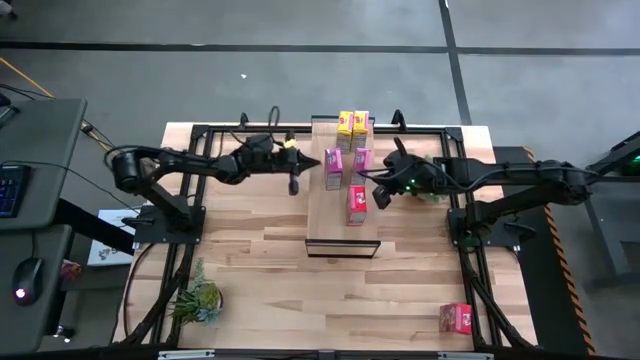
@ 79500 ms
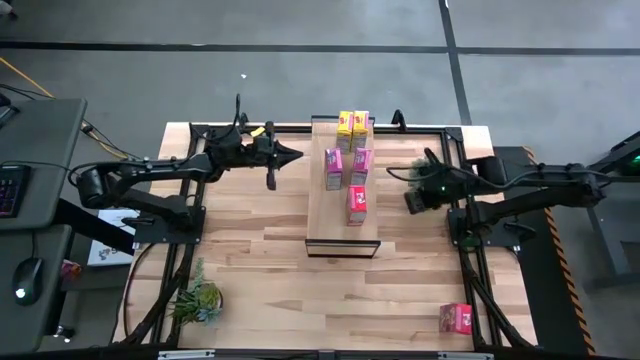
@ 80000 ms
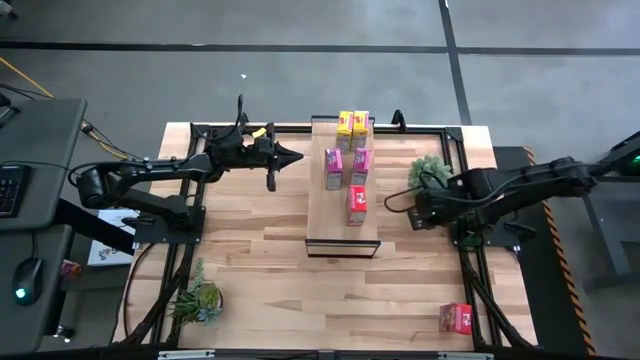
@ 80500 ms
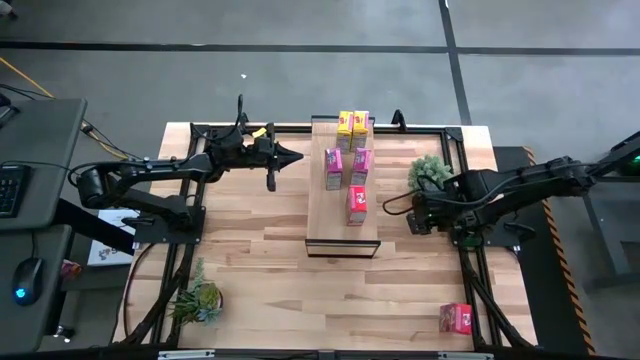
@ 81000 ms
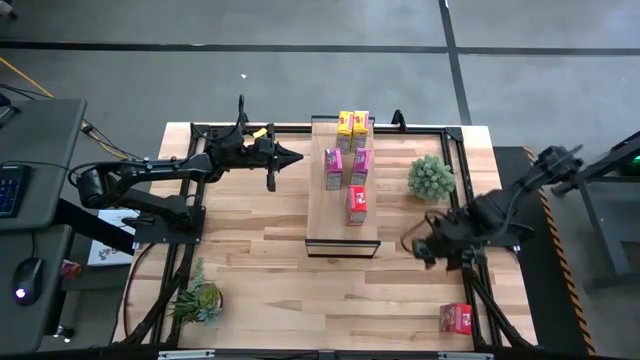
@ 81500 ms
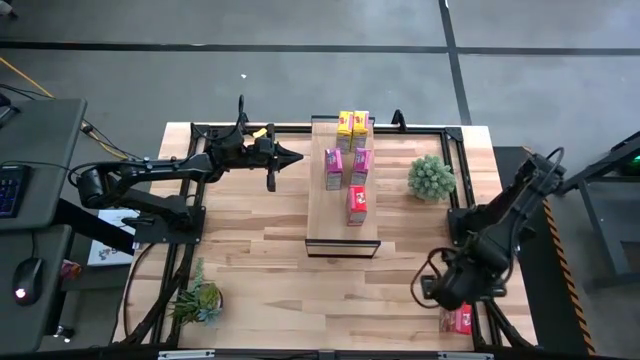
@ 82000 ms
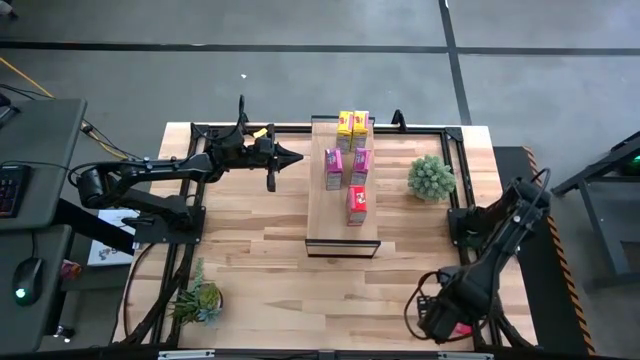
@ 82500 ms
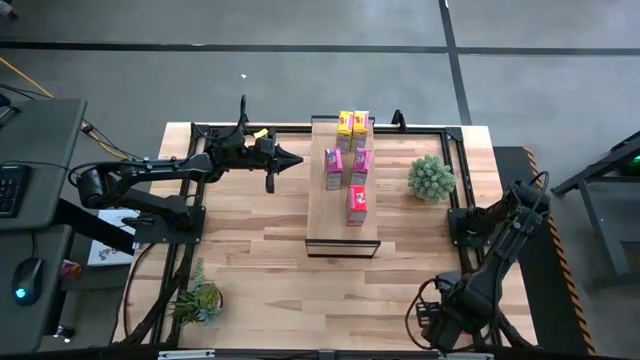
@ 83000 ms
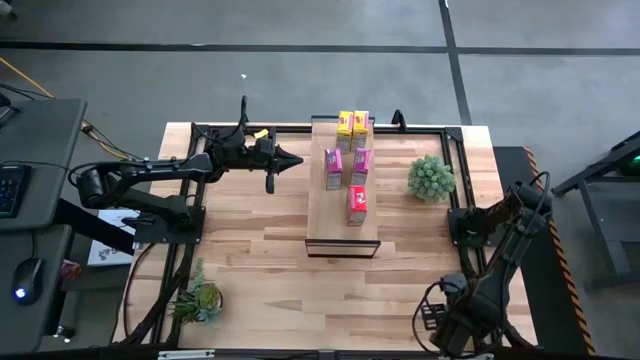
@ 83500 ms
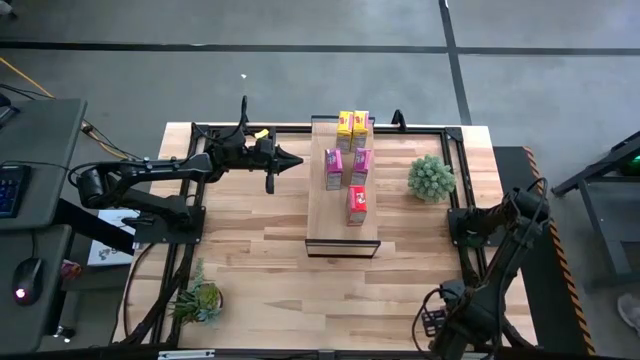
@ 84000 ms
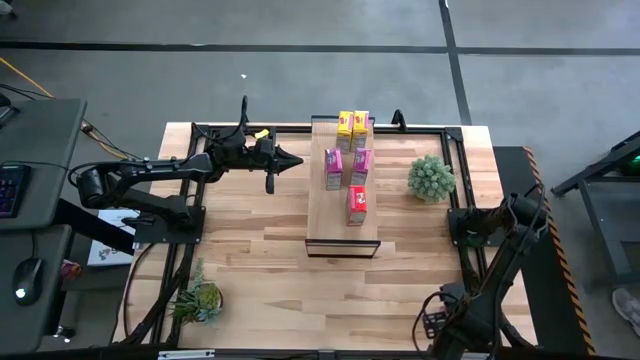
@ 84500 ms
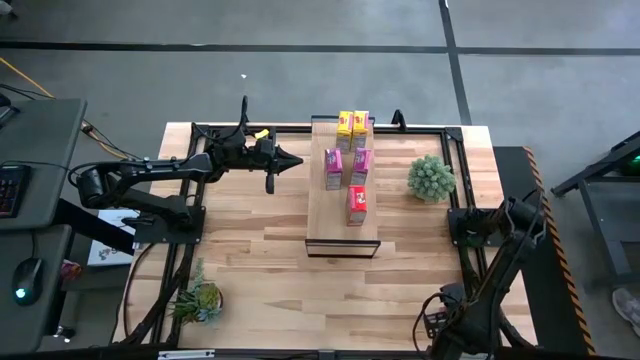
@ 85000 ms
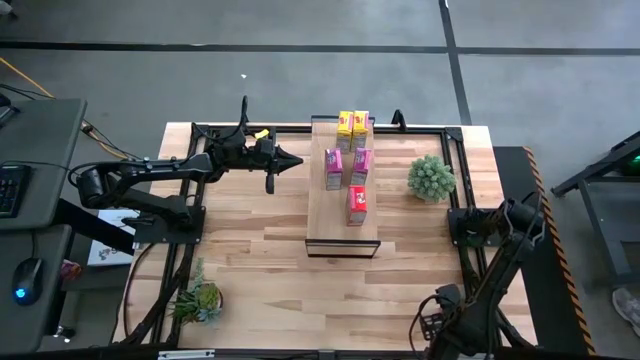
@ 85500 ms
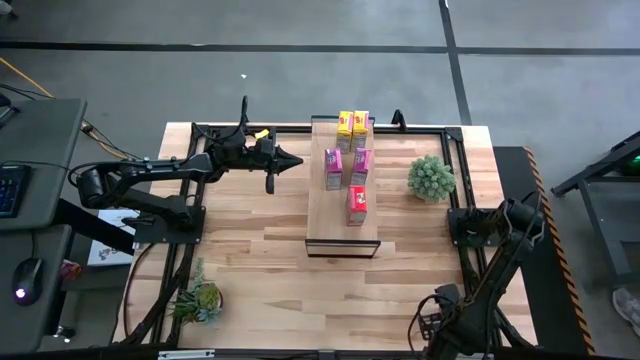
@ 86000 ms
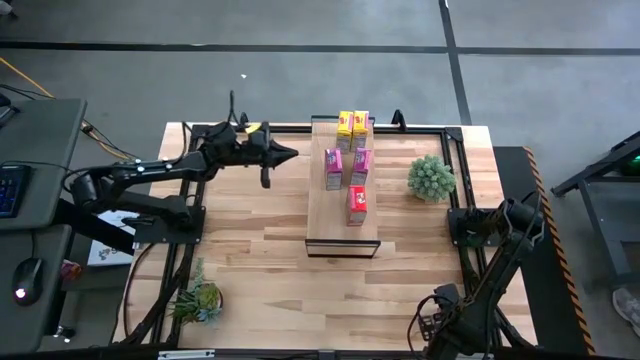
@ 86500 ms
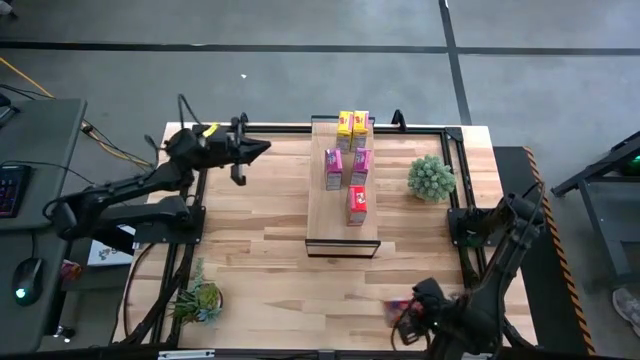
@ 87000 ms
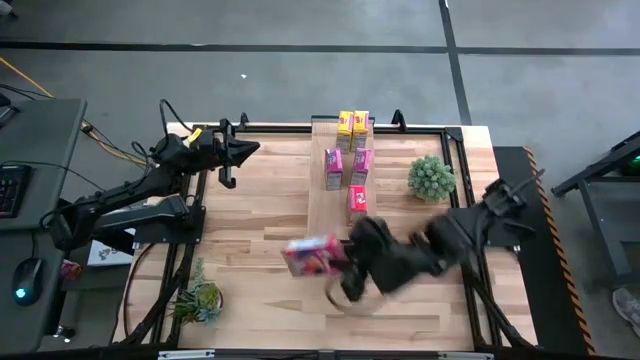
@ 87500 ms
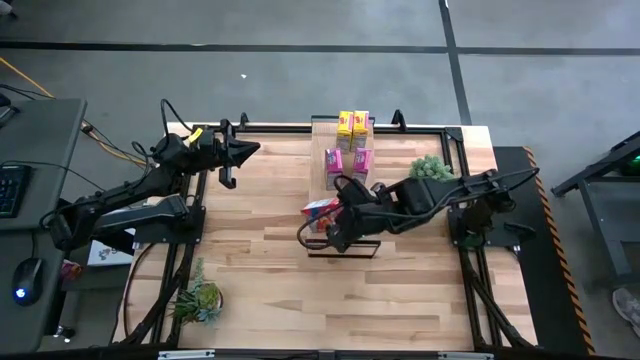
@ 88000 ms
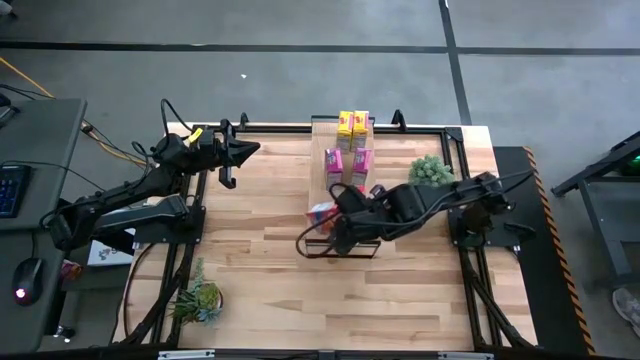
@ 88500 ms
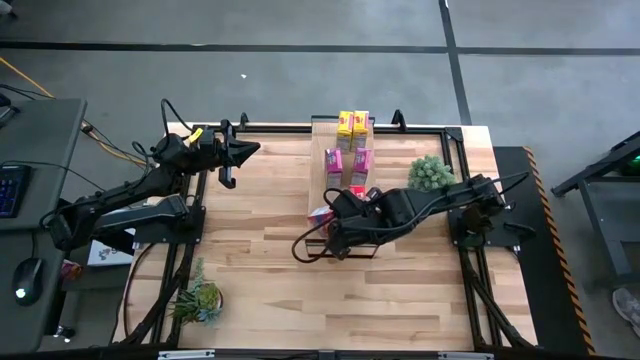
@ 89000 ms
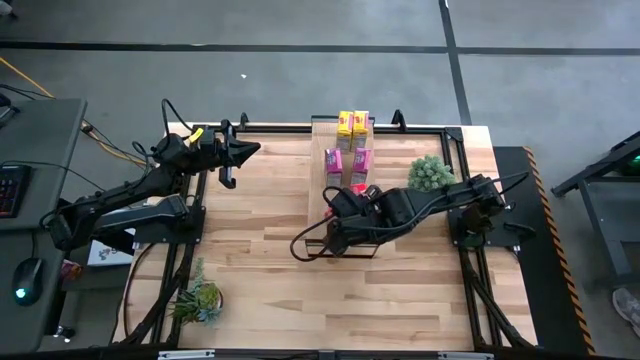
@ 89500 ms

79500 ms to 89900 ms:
Task: Stack cereal on shelf
Put the red cereal box on the shelf

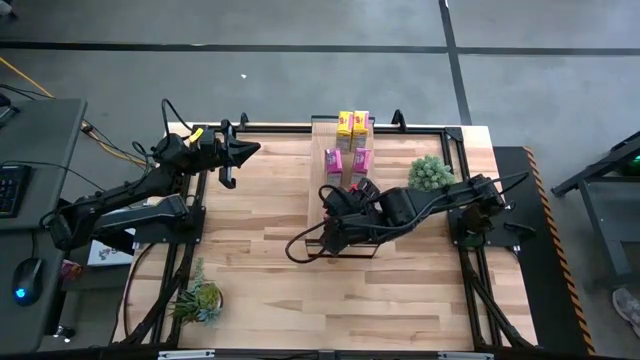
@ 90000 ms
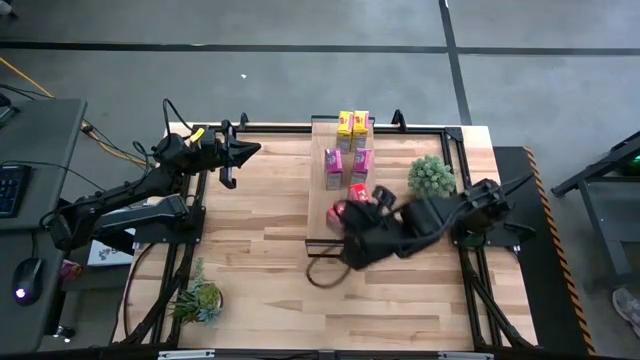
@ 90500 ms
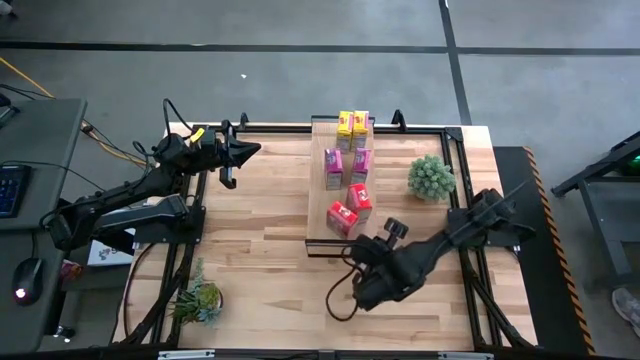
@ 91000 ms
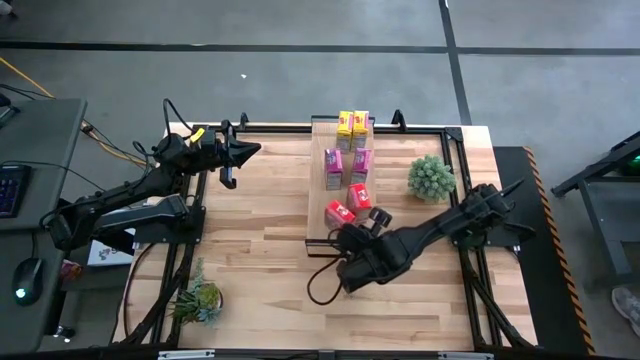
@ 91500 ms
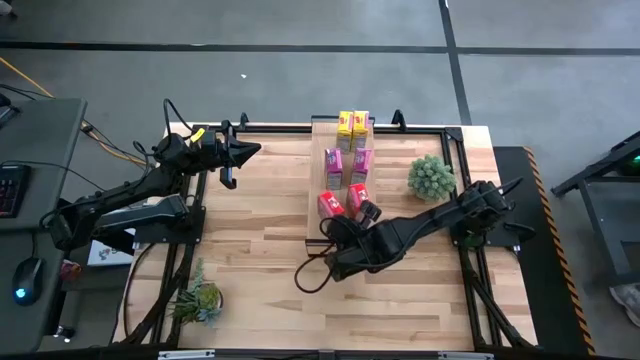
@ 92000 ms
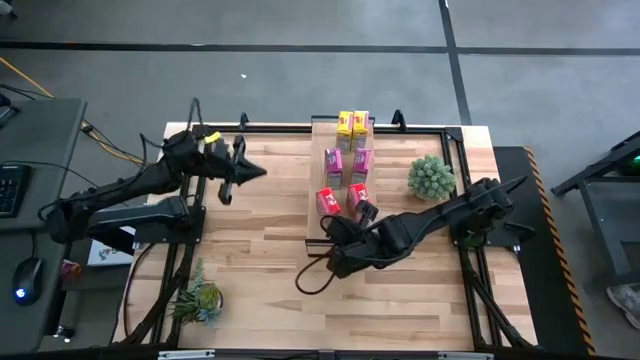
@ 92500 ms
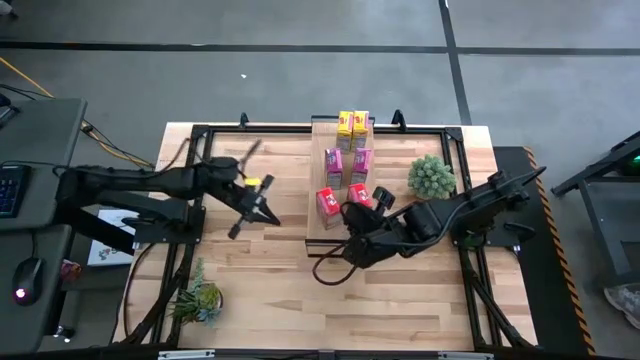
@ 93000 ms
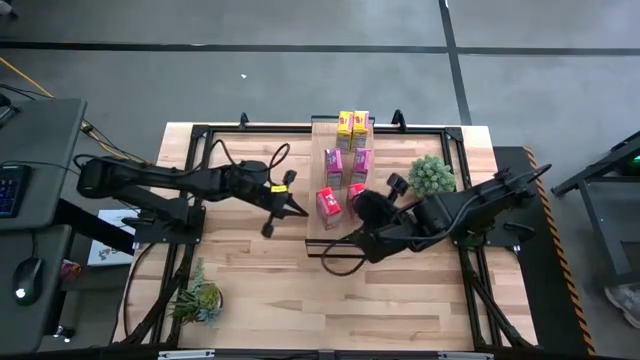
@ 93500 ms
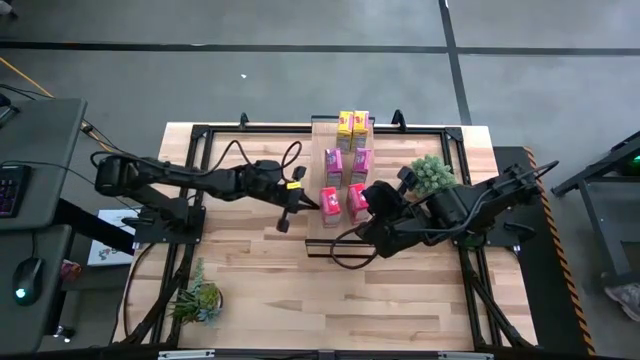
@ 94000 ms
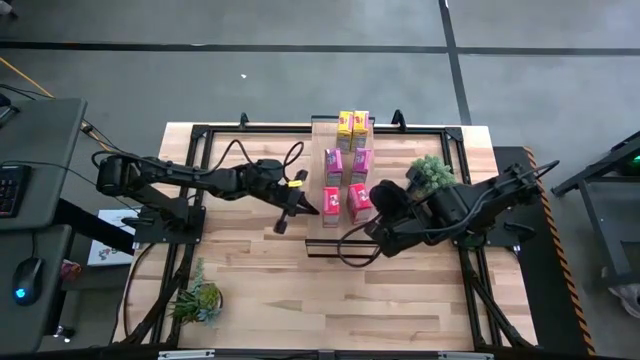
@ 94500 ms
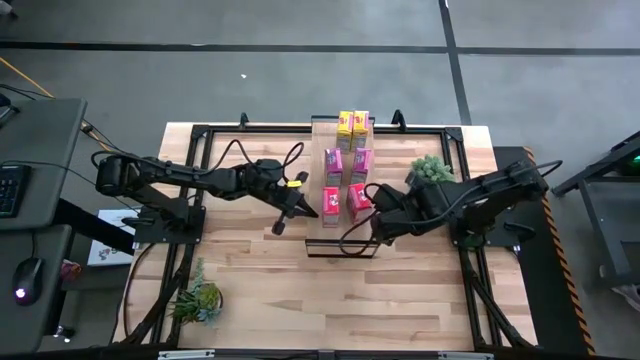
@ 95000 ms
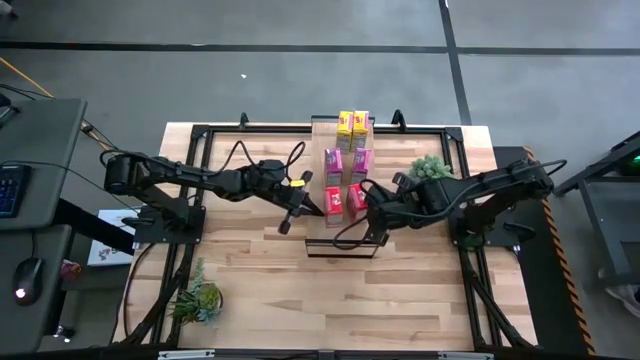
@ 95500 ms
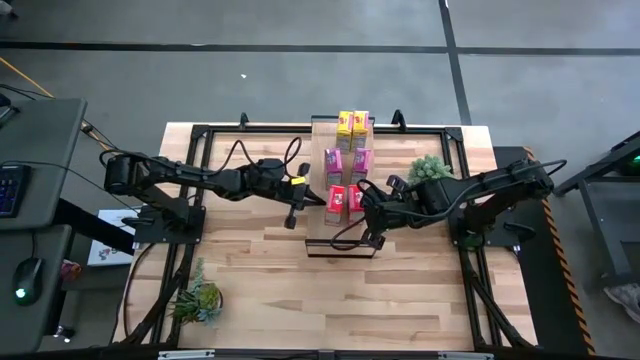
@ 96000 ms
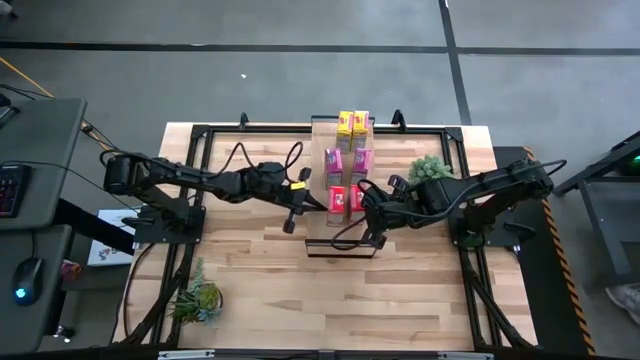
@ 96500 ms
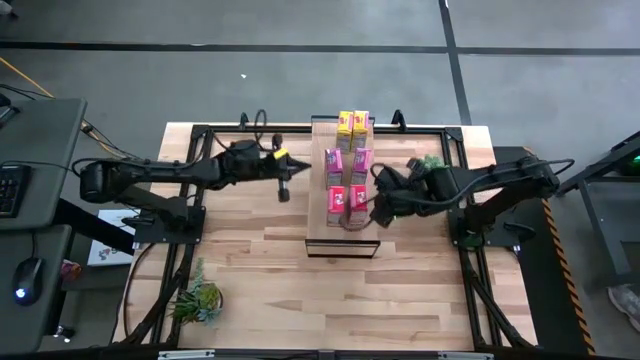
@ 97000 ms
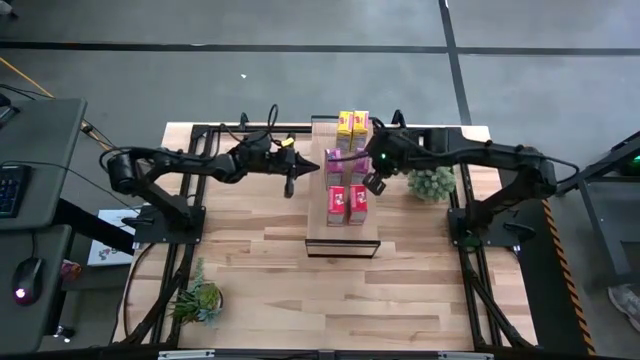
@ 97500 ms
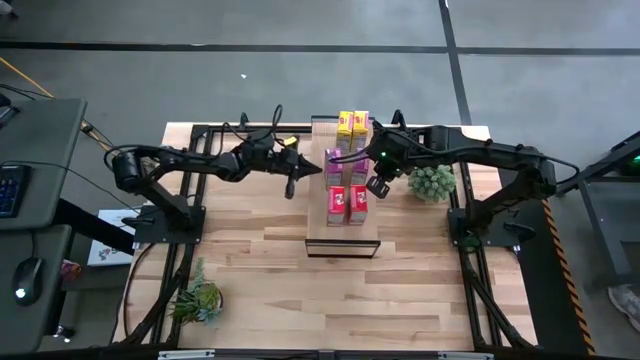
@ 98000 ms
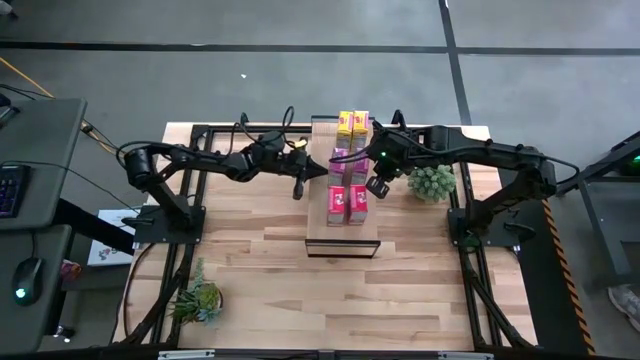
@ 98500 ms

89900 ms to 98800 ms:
Adjust the cereals box on the shelf

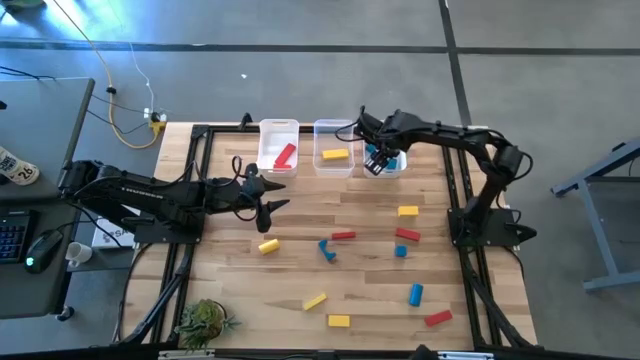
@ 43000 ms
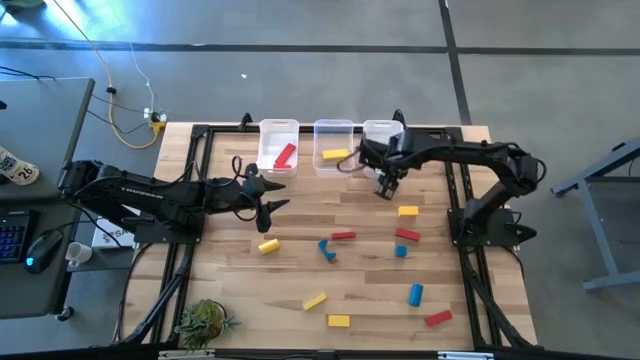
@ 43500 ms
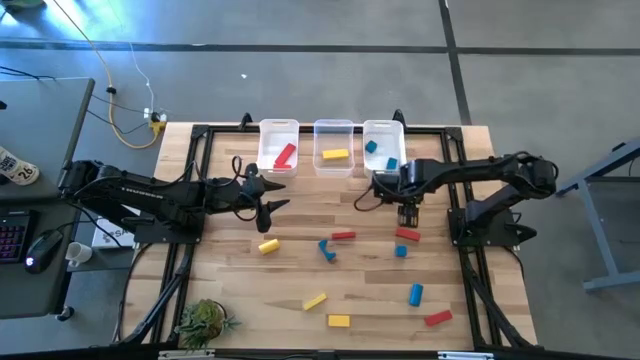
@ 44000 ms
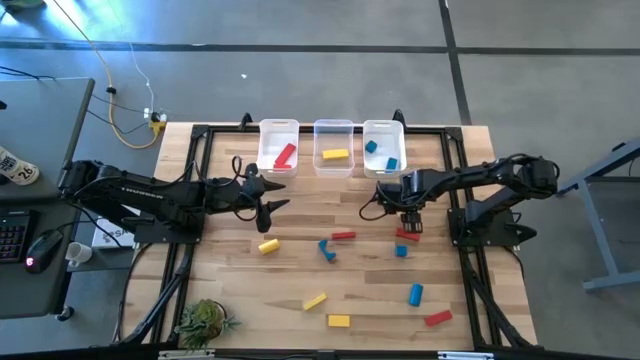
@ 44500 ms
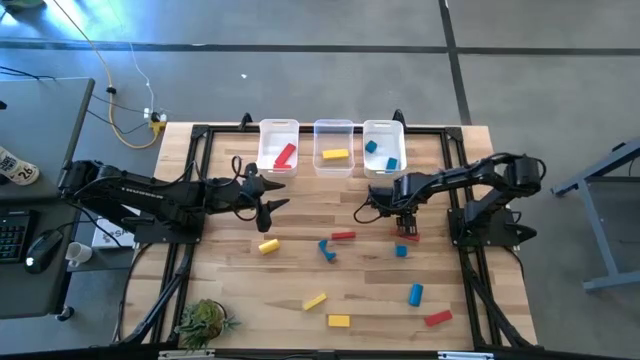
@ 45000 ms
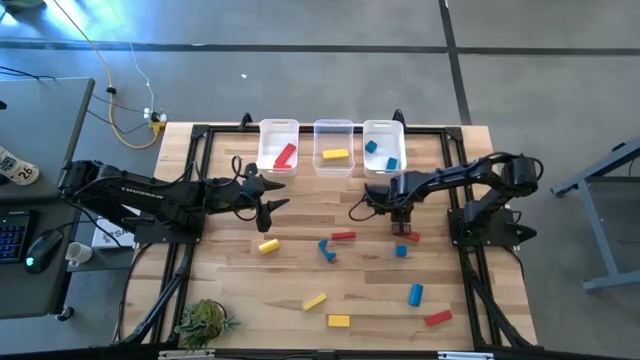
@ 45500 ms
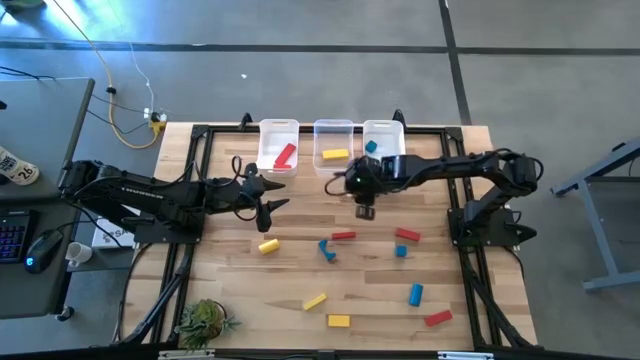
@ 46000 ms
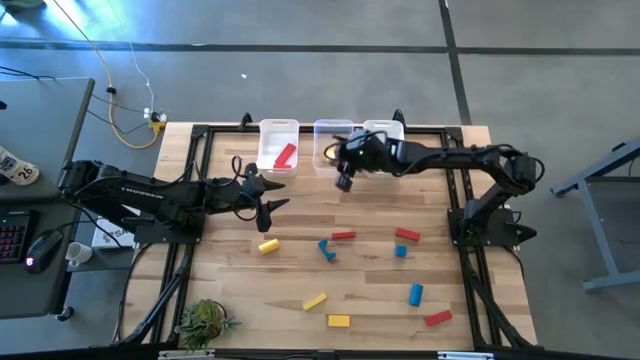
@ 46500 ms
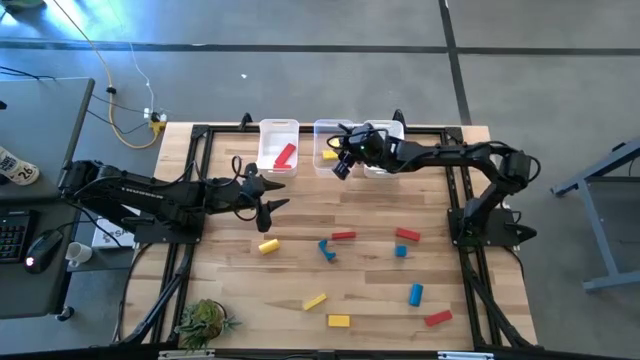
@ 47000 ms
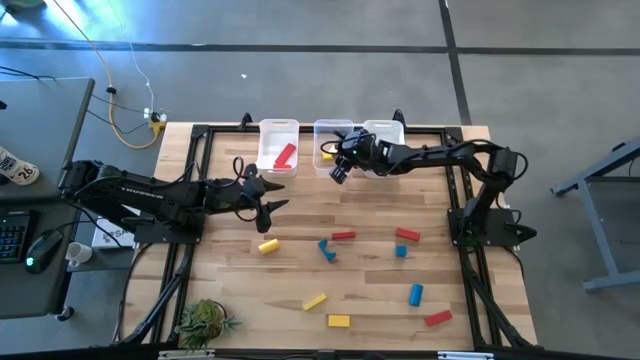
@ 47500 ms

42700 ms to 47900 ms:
Task: Sort & place blocks by color
Put the yellow block into the transparent bin
